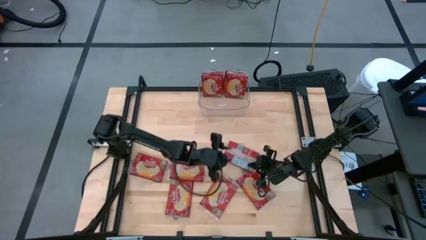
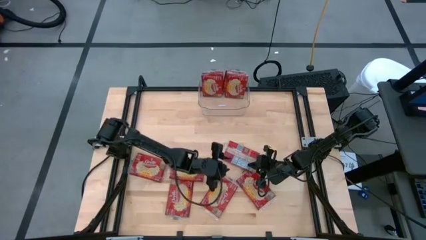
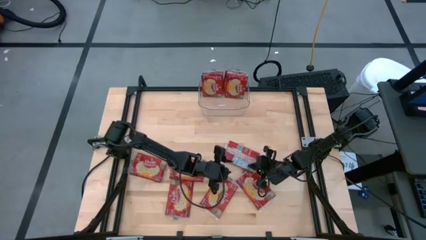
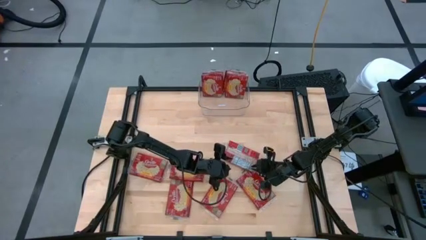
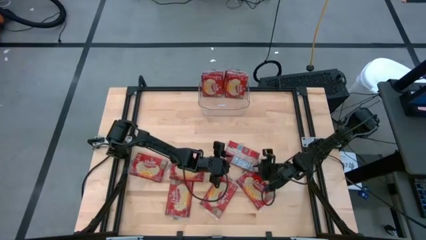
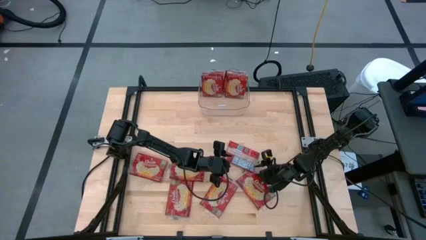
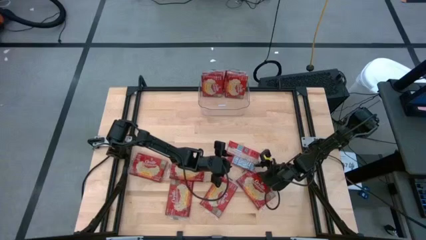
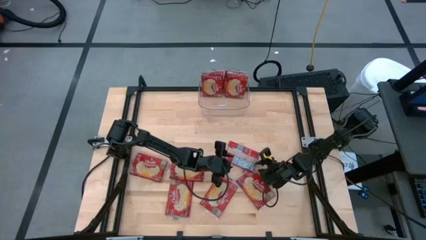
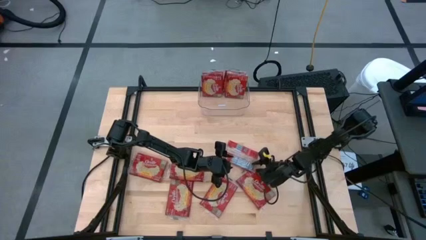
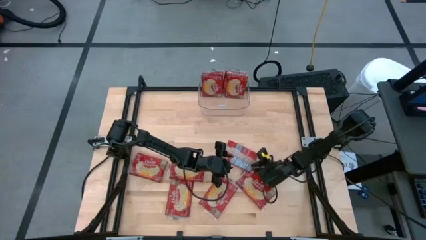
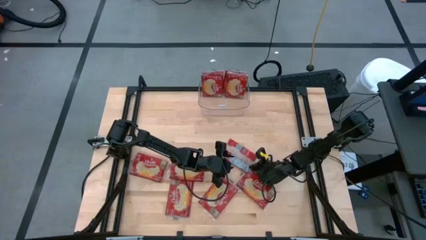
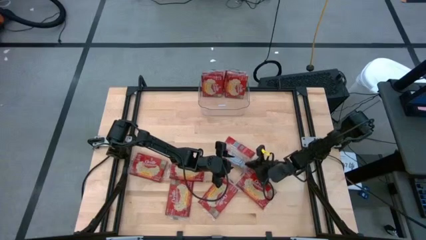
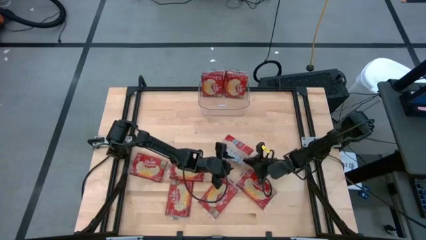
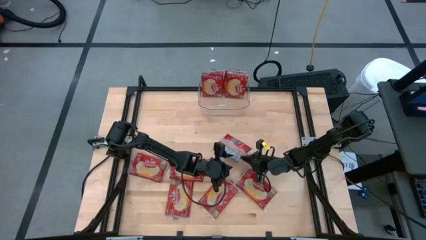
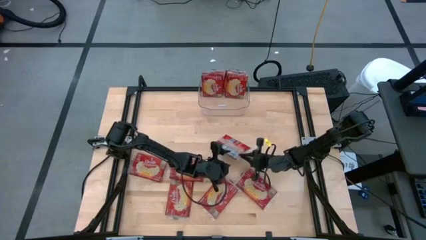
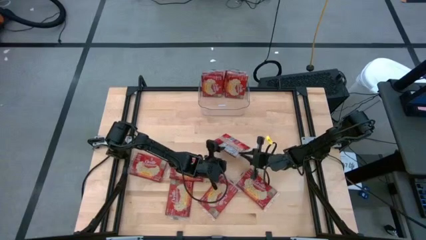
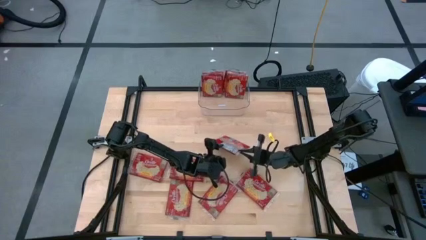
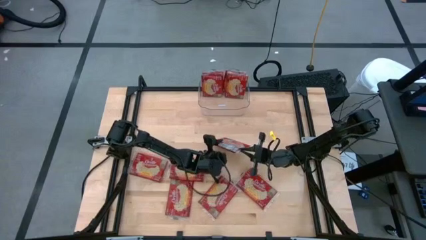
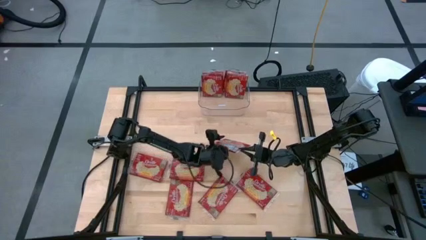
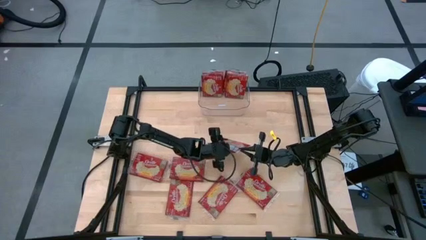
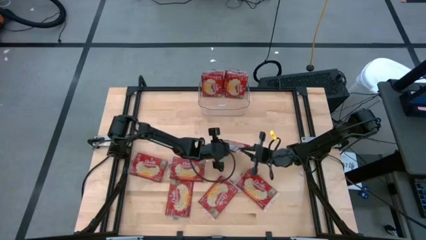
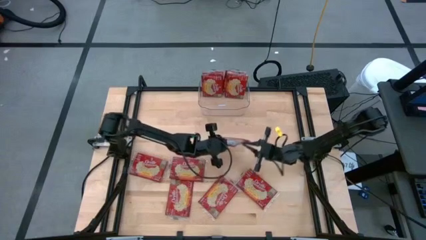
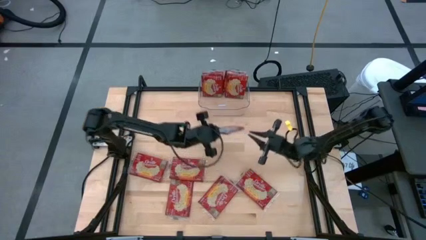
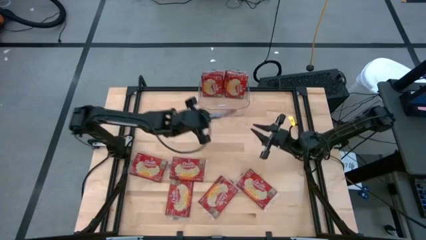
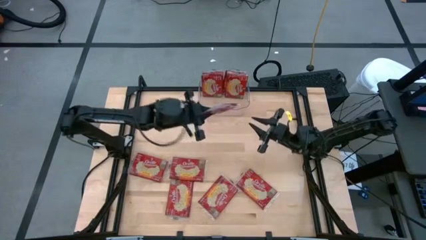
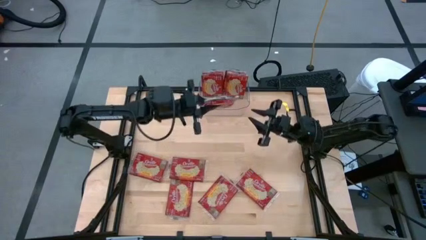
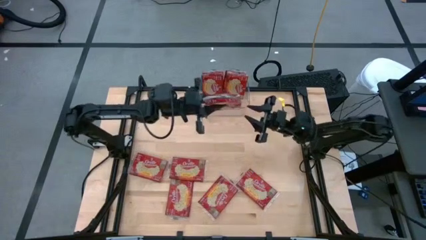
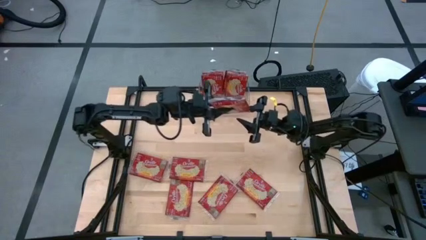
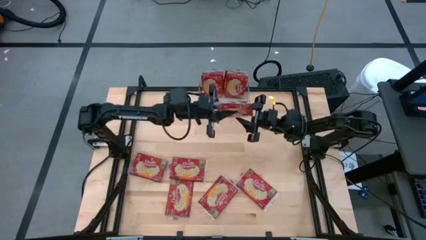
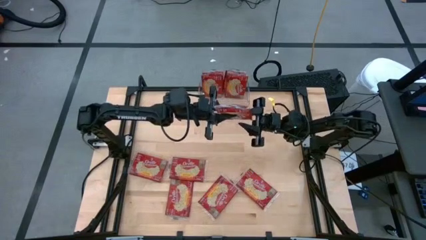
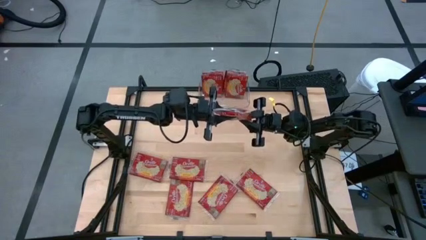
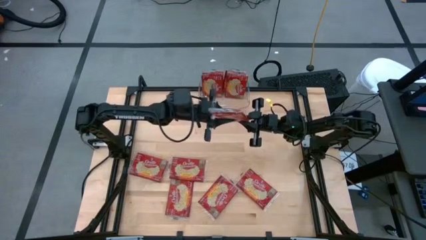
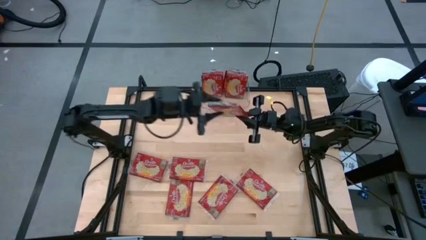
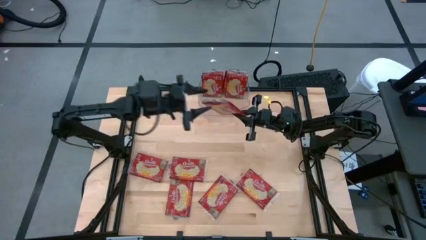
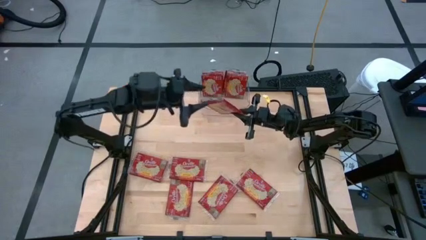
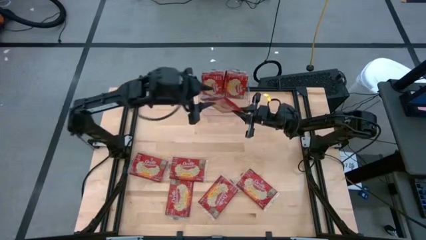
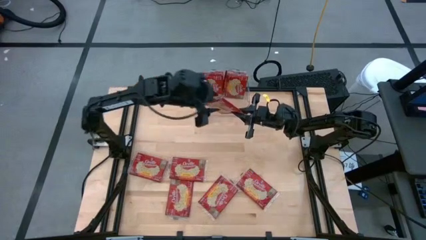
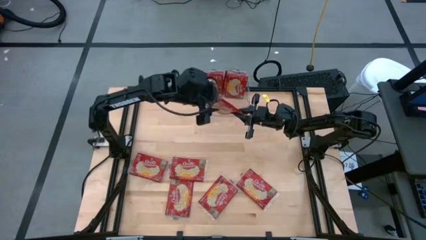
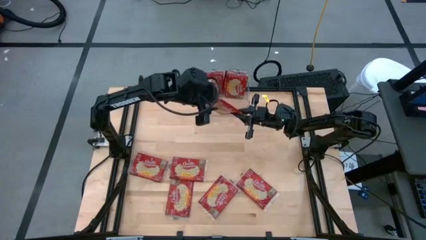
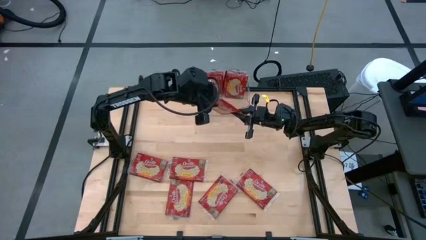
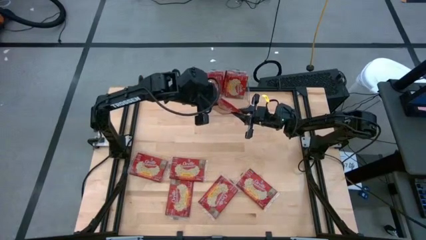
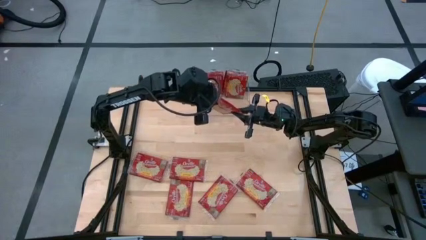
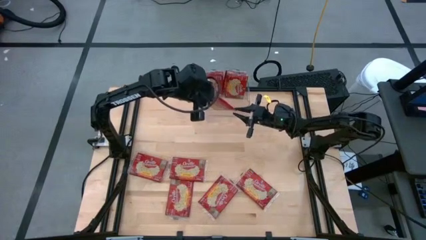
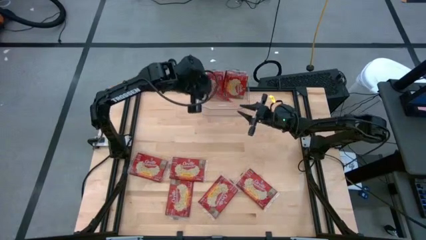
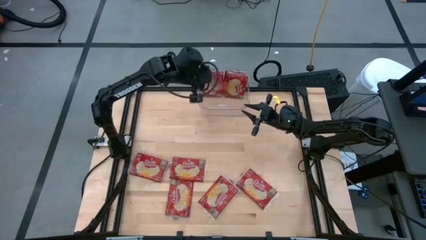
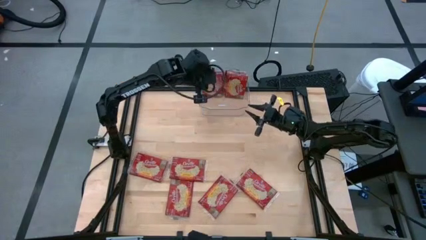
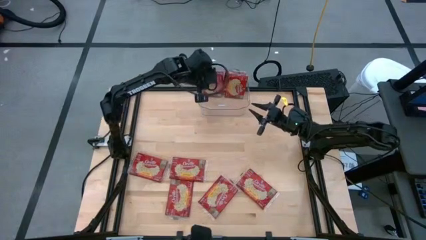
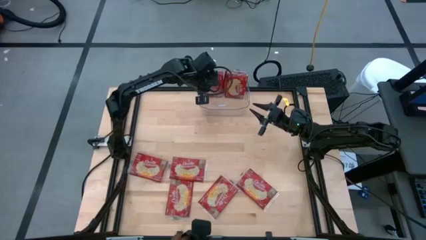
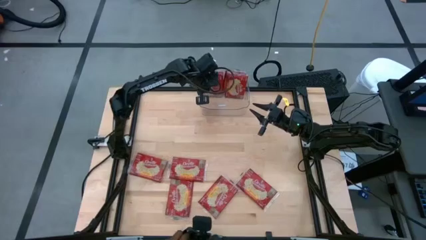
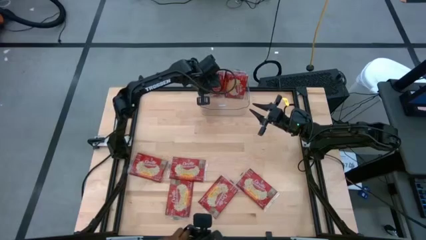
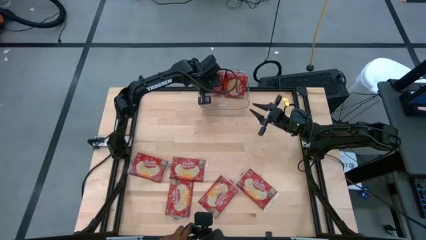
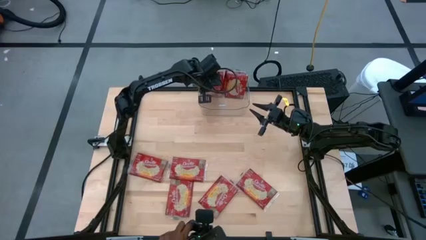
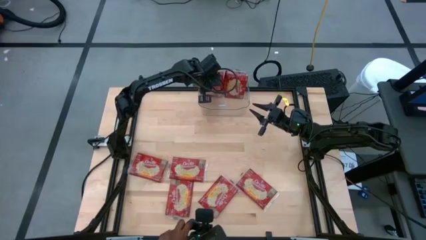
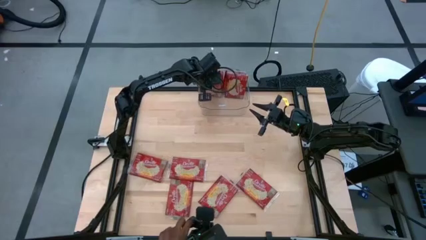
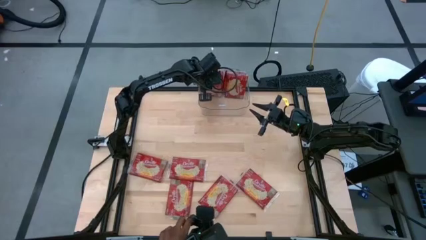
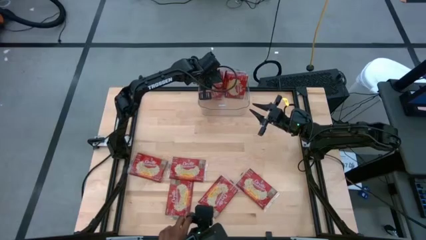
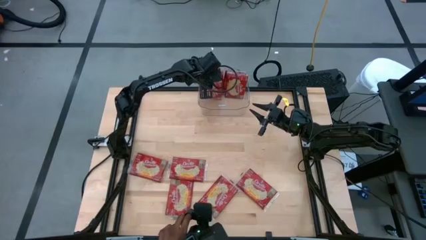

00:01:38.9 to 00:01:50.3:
Task: Sort popcorn bags into baskets
Put the red popcorn bag into the transparent bin

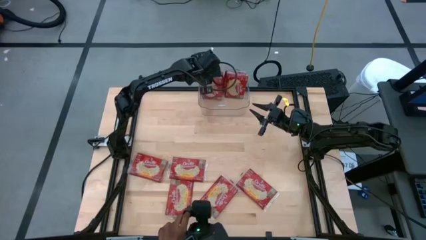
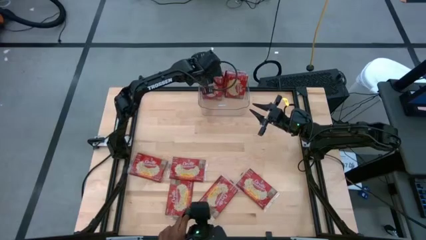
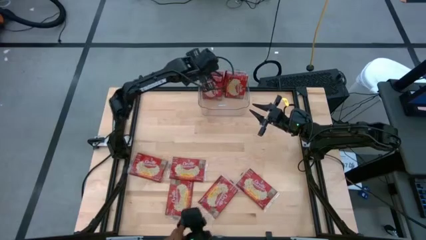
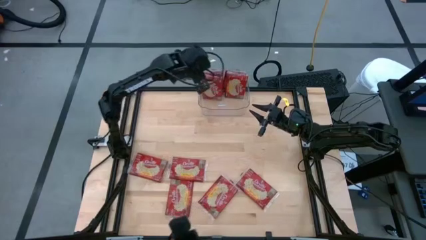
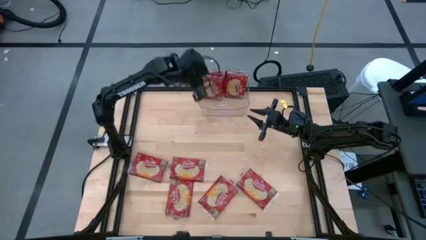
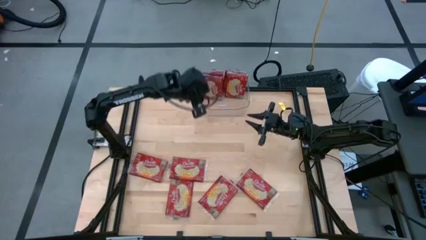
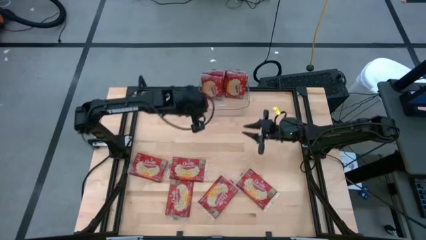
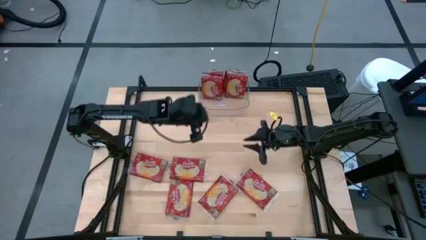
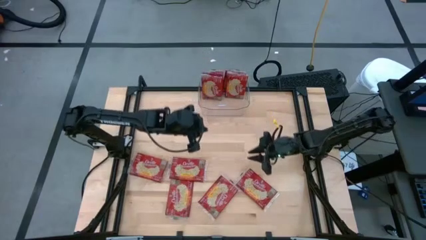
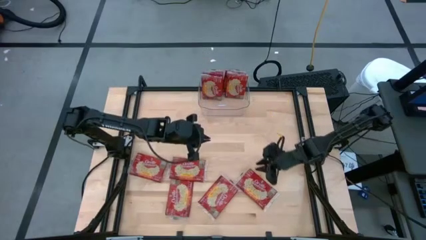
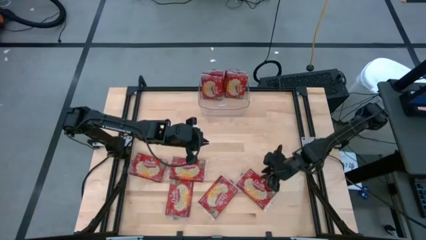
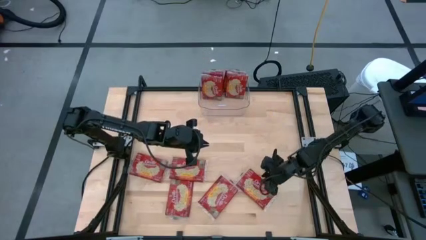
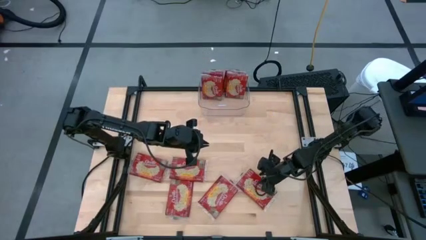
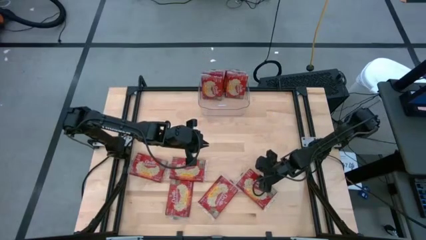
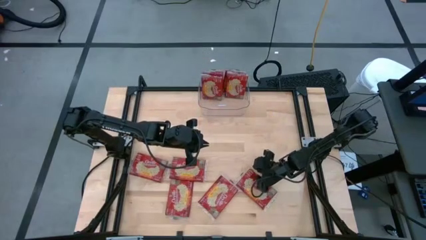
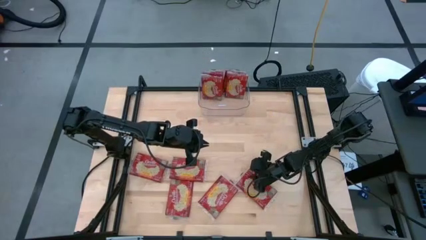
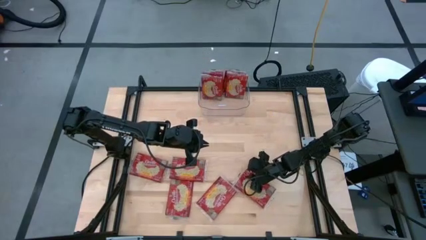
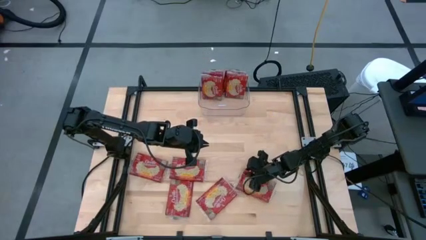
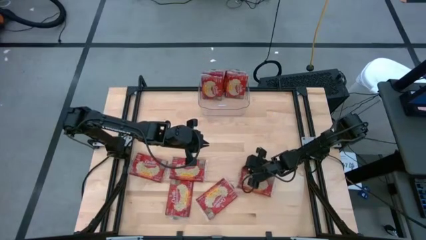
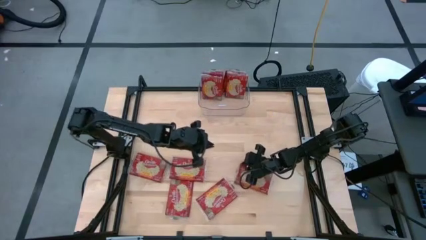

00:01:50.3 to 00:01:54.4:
Put the red popcorn bag into the transparent bin

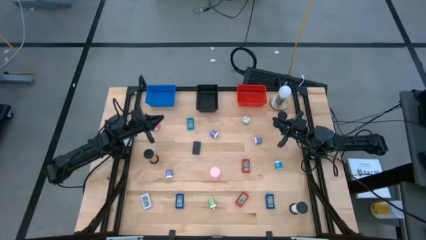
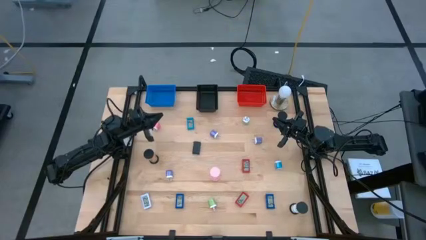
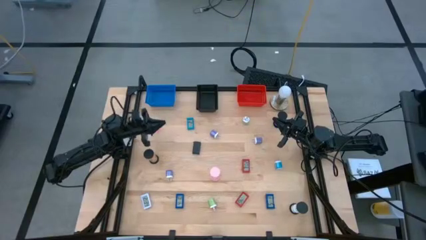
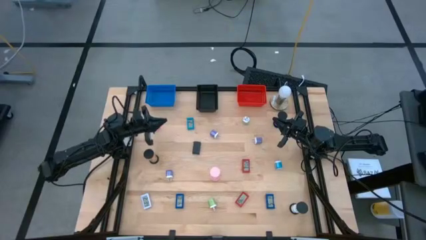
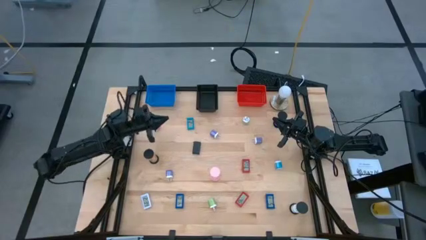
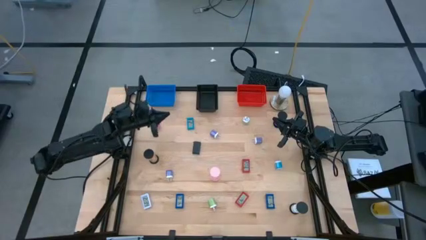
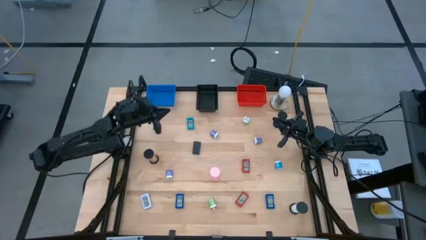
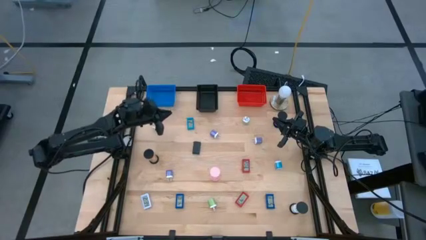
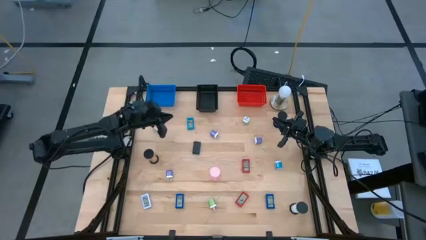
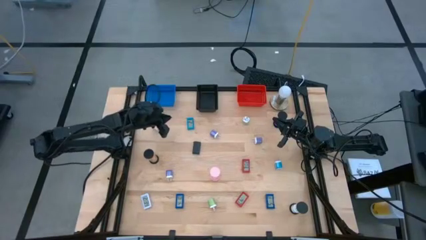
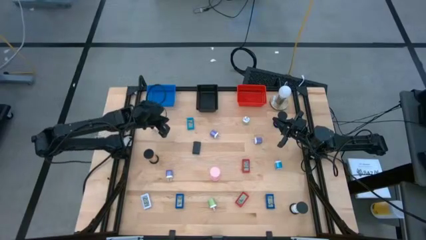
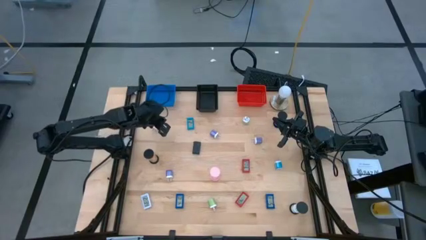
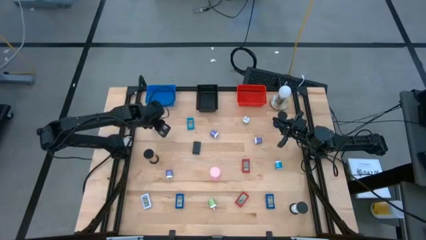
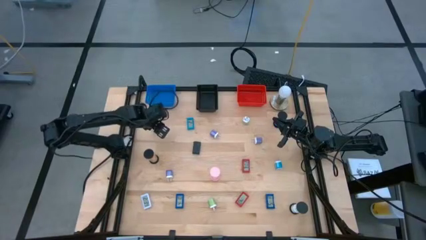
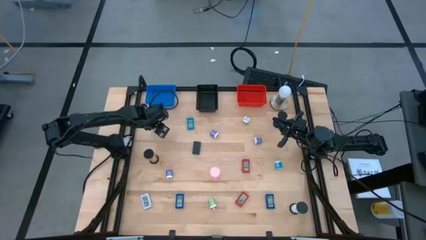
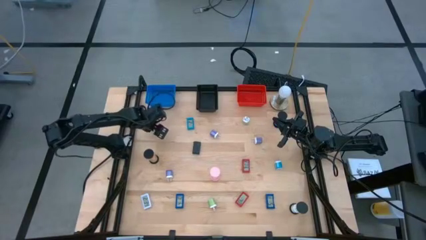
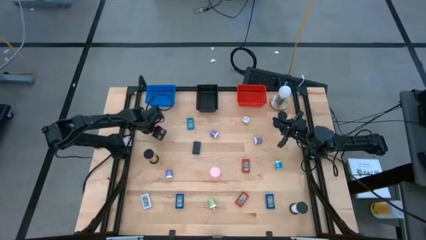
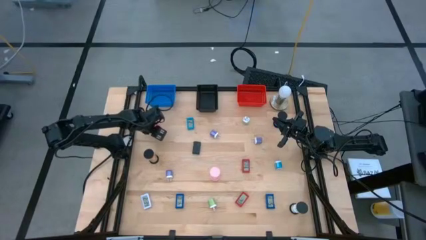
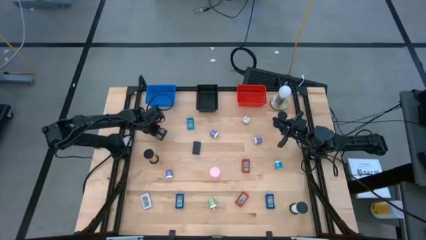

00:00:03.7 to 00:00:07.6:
Task: Pick & Place Office items
Put the pink charger adapter into the blue bin
